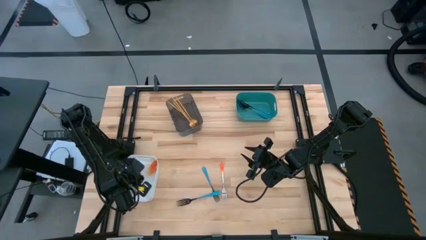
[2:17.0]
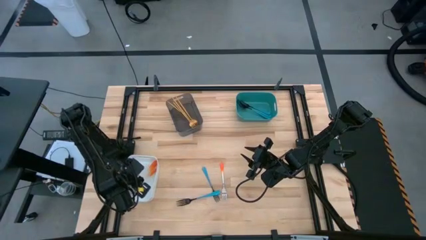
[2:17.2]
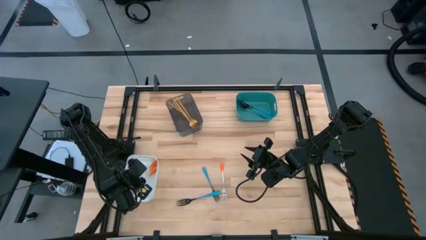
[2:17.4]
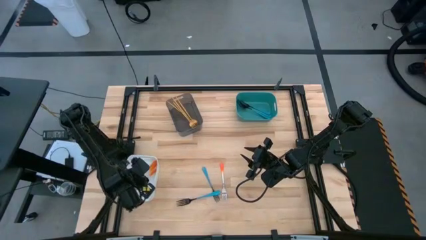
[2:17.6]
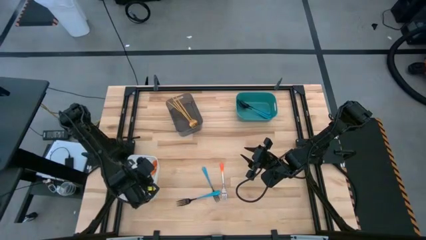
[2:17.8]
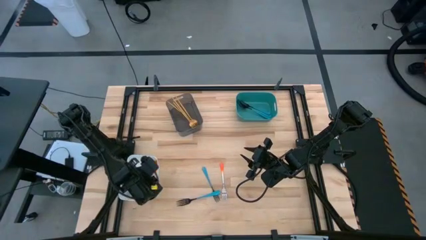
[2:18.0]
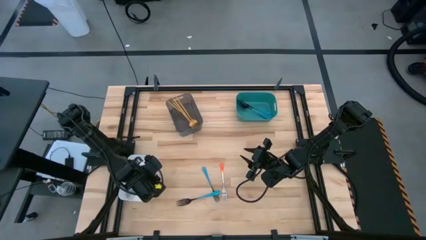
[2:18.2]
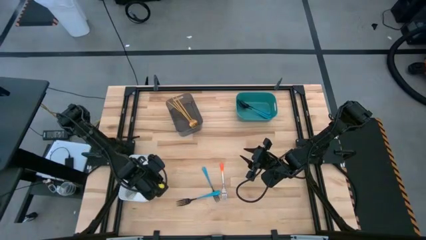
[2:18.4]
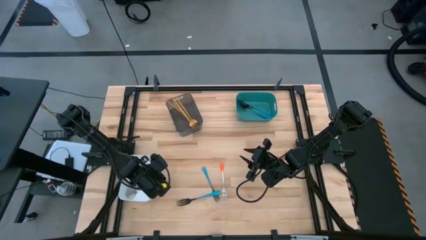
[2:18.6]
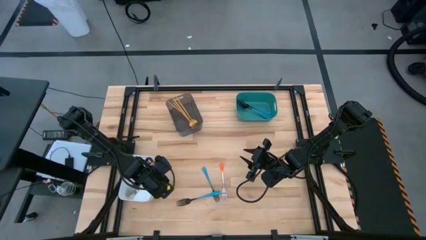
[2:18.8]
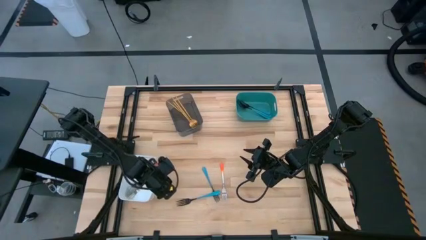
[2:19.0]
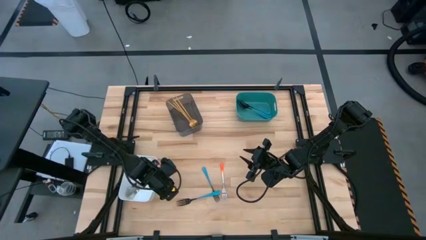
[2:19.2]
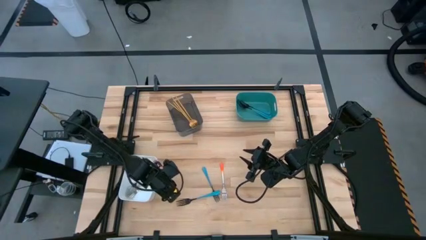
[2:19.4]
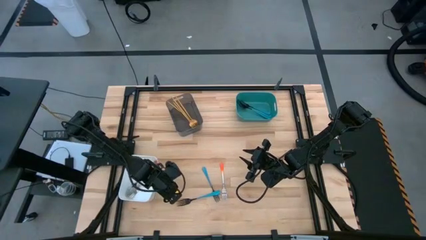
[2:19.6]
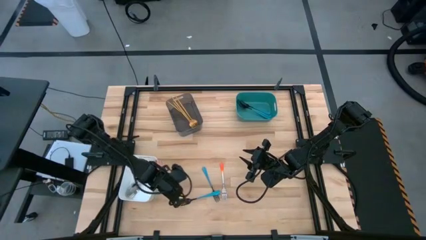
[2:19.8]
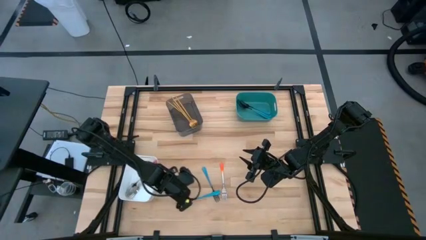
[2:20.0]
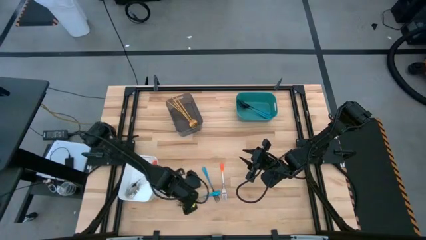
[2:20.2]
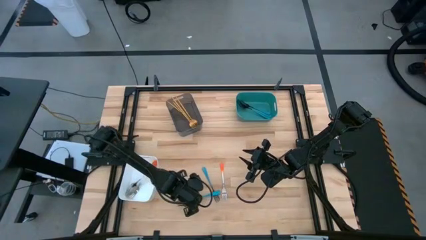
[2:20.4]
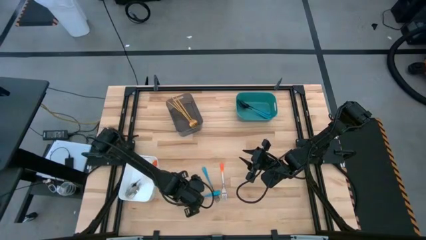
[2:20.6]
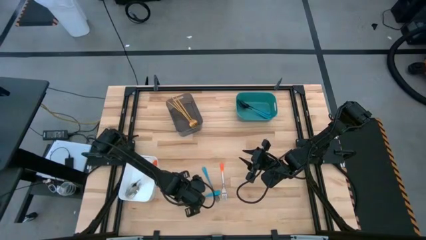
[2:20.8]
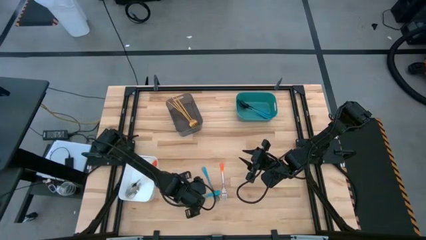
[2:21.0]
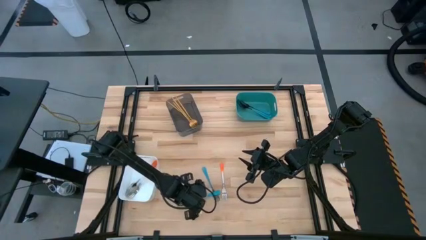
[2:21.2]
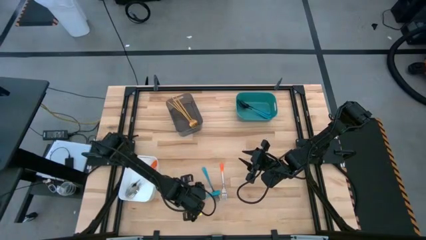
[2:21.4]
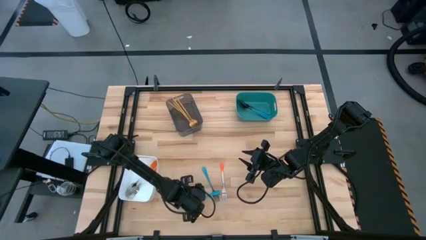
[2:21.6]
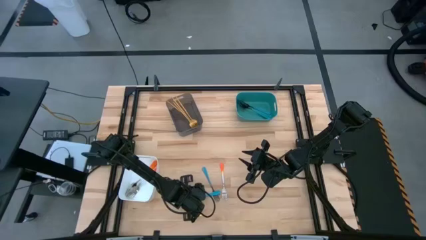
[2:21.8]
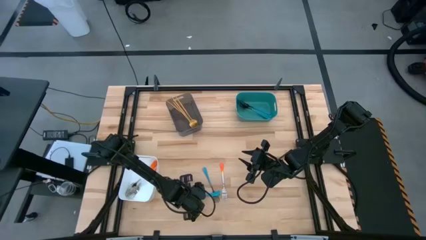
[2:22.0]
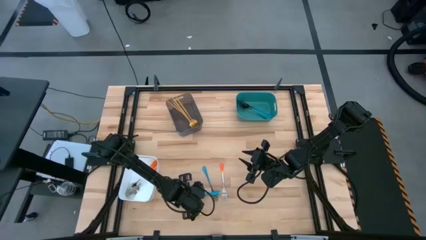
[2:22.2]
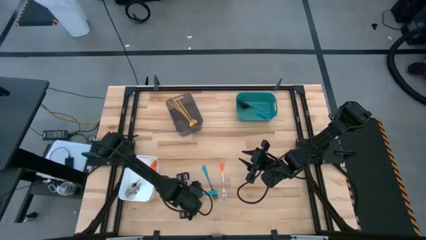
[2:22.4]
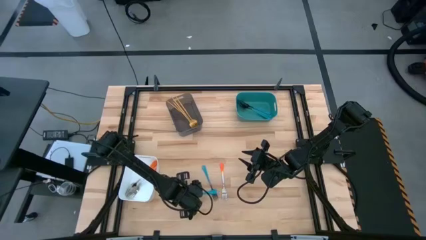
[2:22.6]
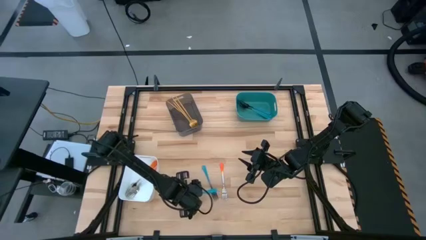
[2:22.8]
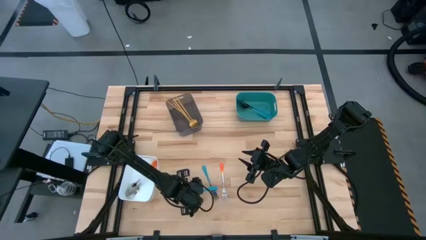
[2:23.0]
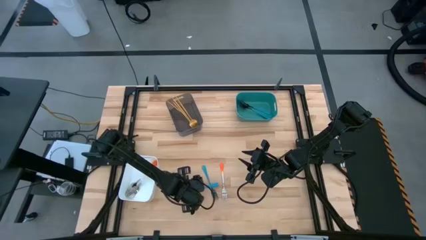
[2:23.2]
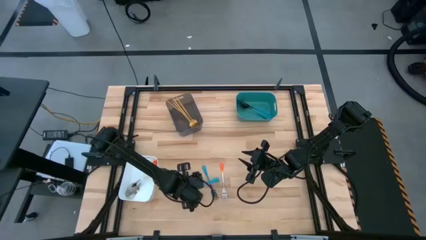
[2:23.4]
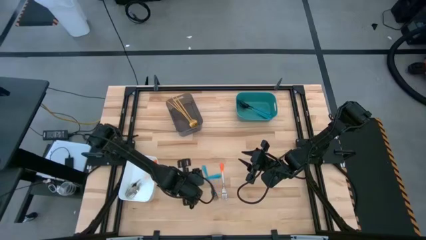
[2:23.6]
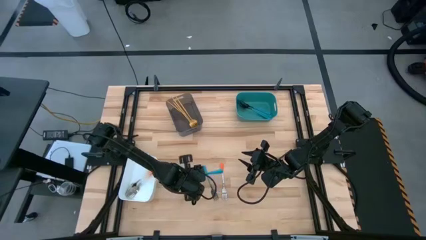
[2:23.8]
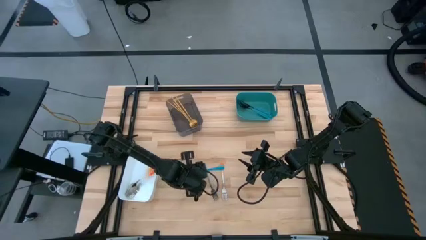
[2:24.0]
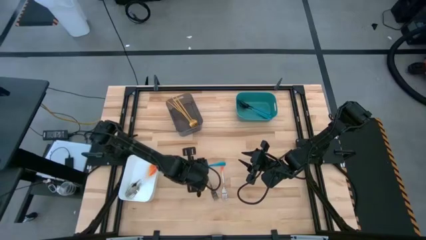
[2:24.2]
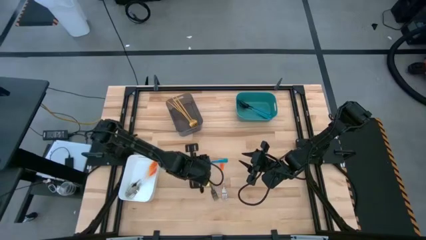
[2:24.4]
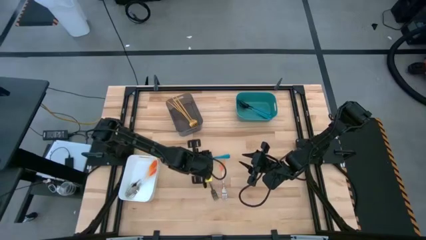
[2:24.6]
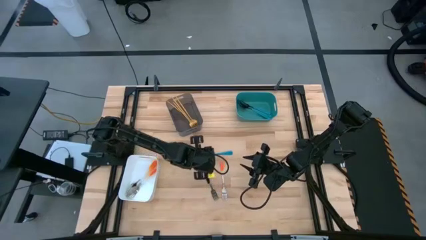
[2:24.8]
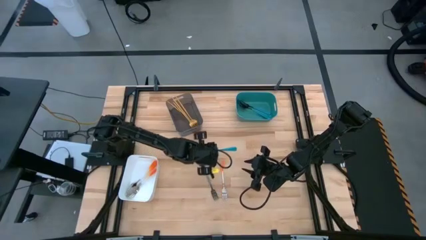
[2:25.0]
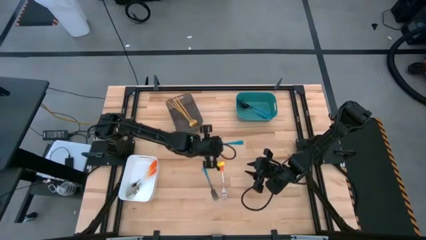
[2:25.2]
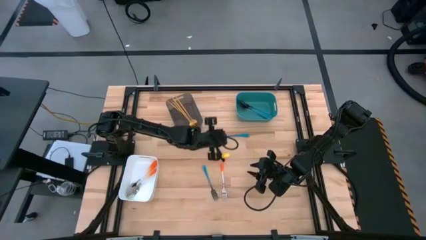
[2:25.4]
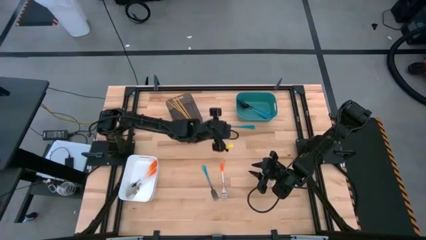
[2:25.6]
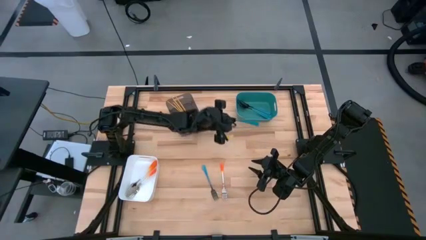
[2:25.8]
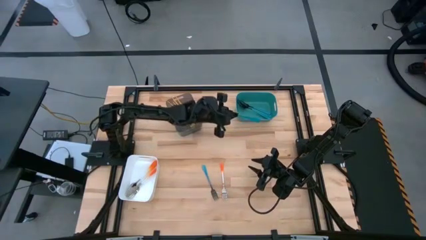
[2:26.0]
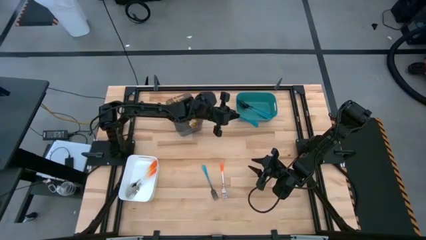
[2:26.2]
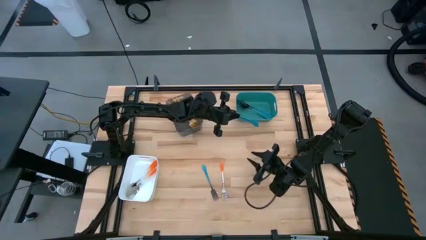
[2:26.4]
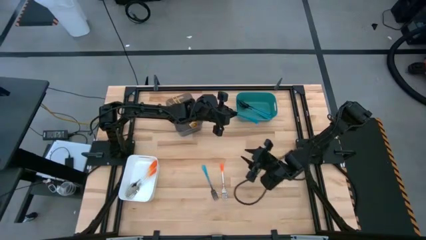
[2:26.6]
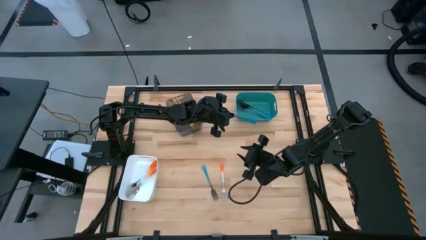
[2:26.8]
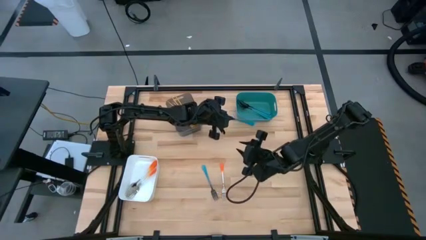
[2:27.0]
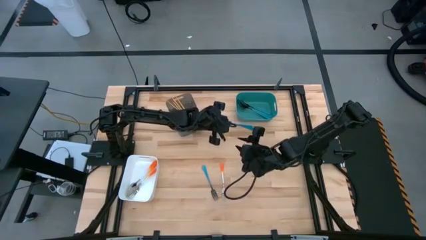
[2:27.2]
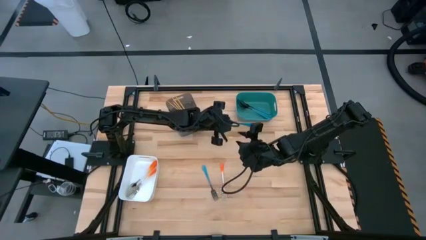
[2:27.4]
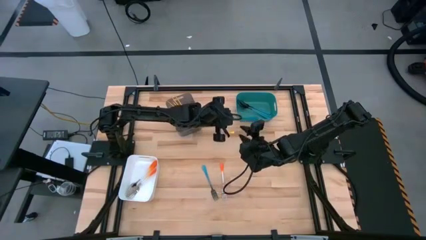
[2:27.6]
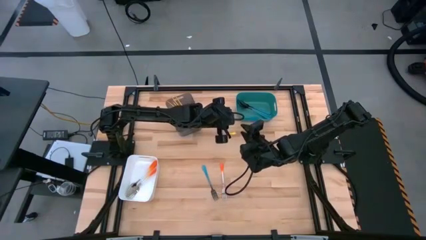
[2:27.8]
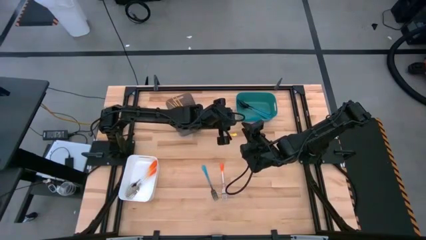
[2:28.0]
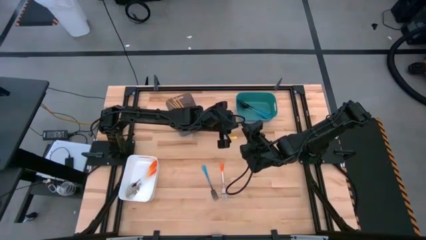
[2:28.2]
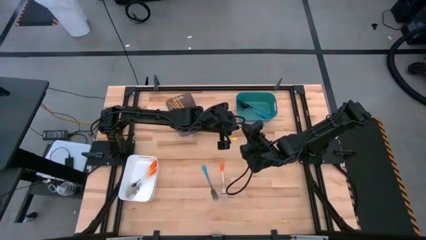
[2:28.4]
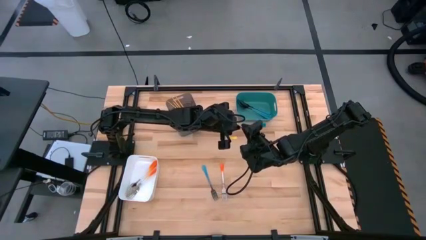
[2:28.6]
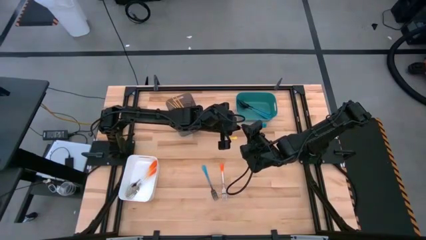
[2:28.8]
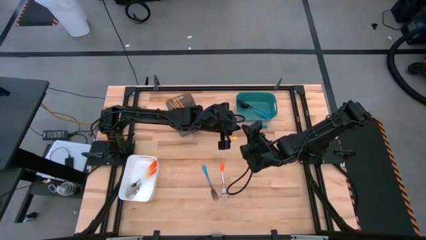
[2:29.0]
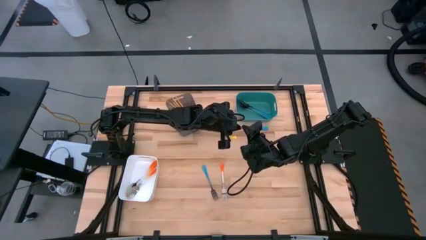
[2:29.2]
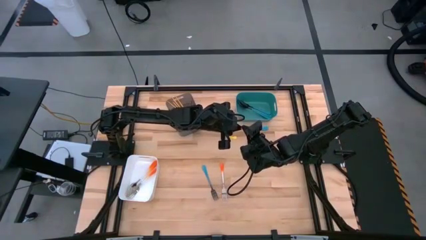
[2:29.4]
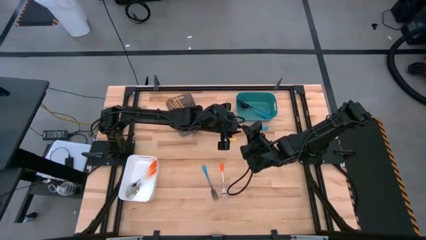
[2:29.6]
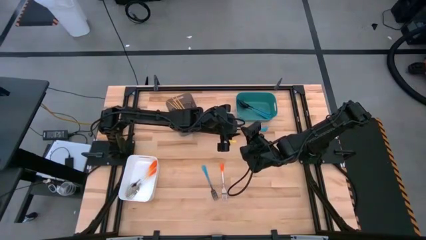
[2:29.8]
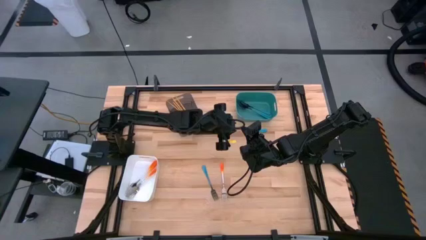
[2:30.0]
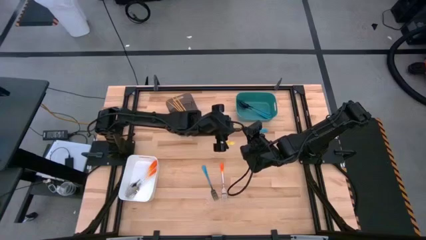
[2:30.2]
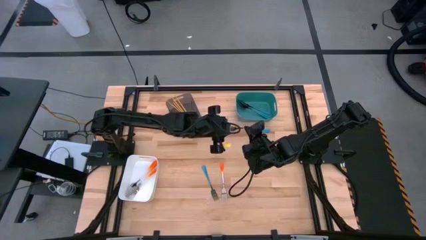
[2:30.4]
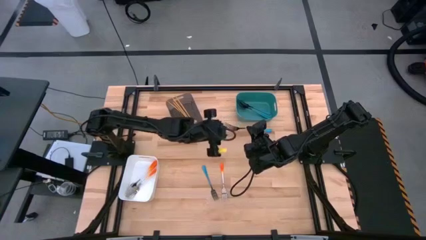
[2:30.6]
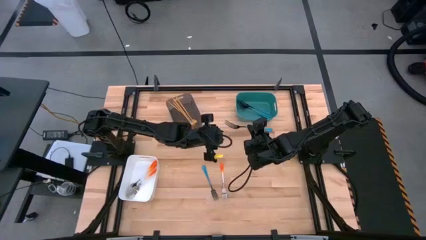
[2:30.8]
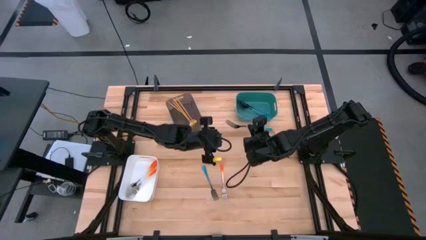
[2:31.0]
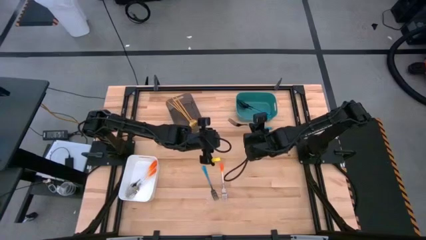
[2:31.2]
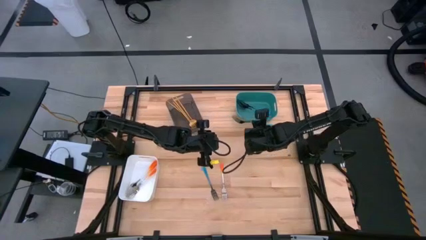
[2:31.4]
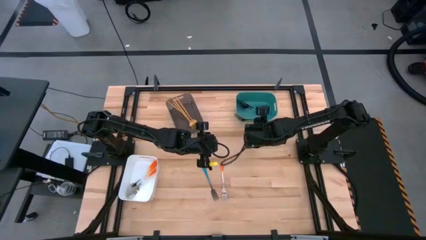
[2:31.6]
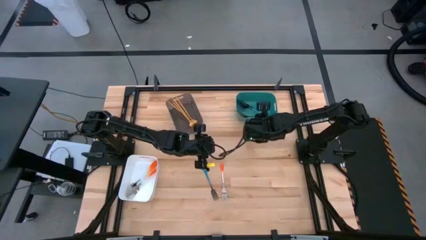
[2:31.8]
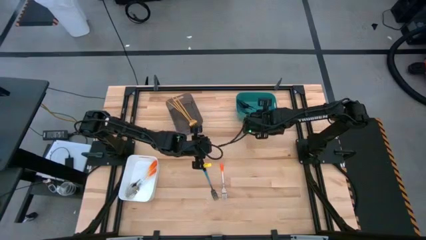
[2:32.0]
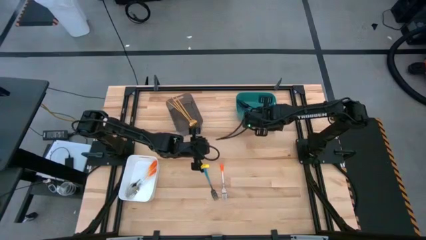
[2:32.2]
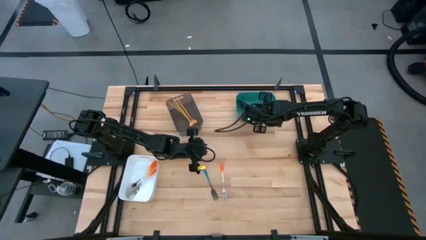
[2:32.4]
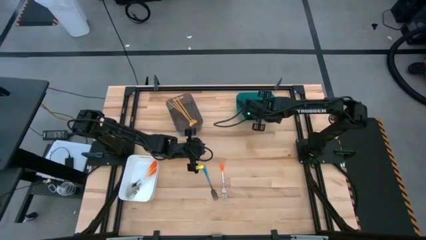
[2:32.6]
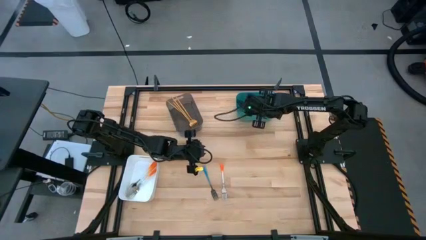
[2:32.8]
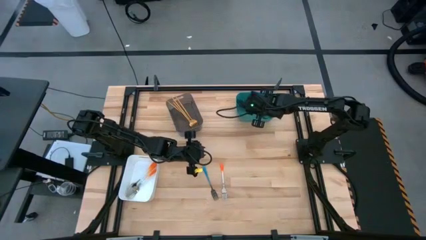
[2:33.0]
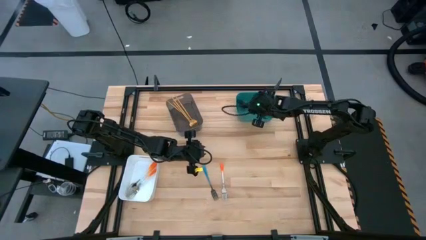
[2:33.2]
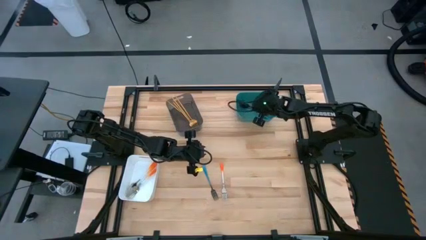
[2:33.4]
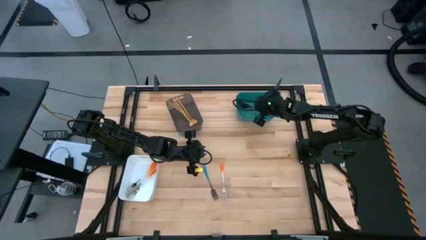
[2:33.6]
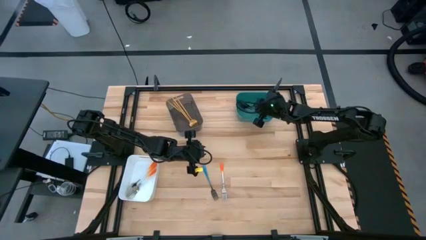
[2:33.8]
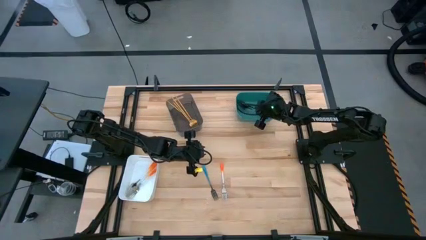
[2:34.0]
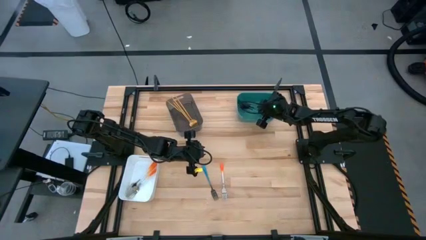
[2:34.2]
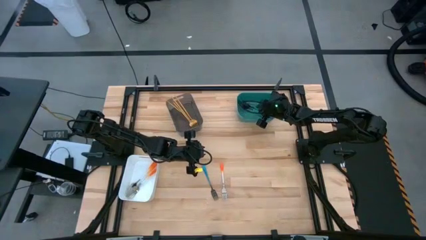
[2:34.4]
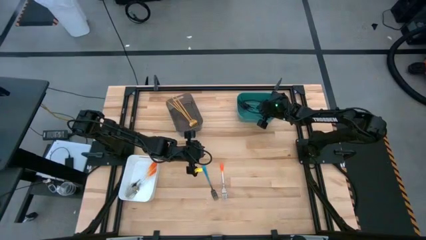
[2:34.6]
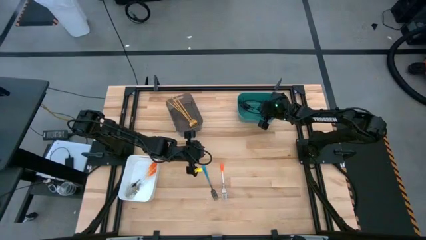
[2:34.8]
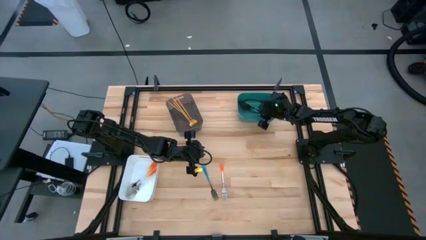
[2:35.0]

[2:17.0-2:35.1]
Task: Sort silverware by color (type)
Put the blue fork into the green bin
